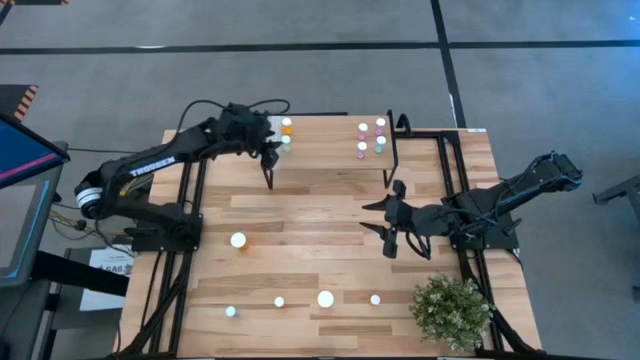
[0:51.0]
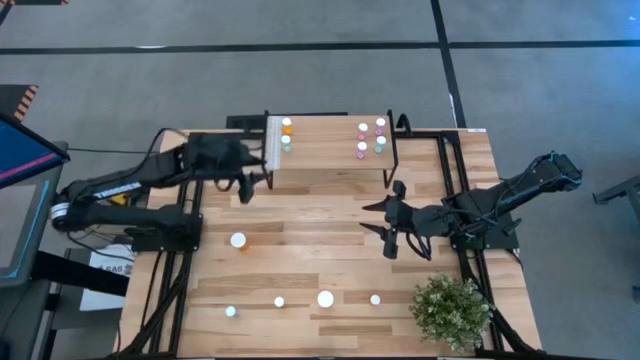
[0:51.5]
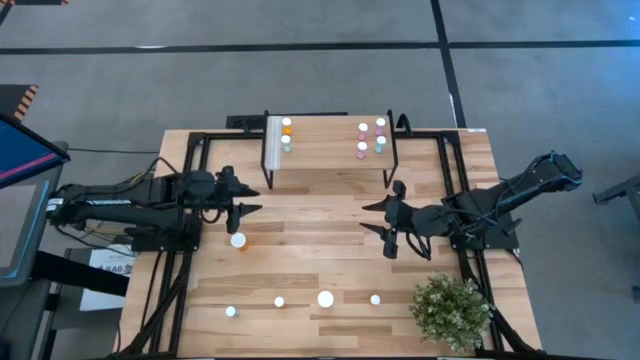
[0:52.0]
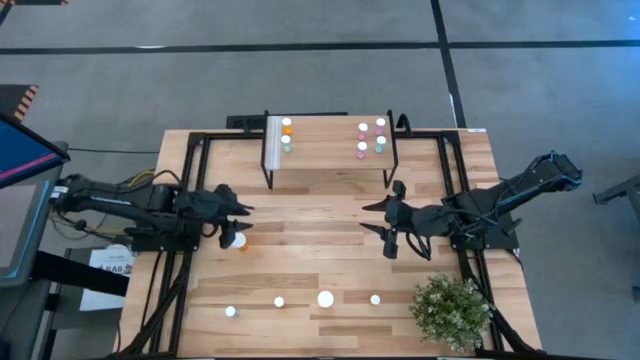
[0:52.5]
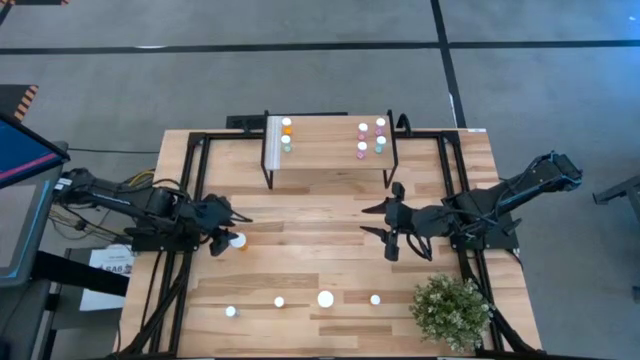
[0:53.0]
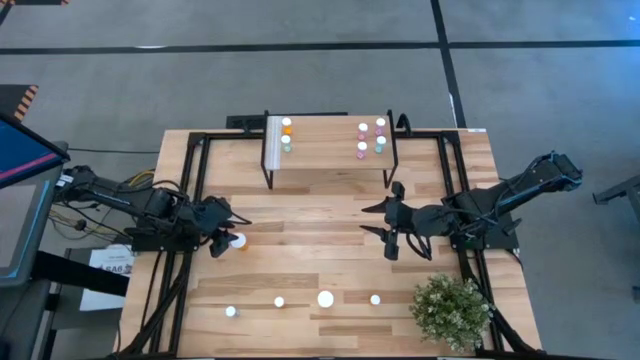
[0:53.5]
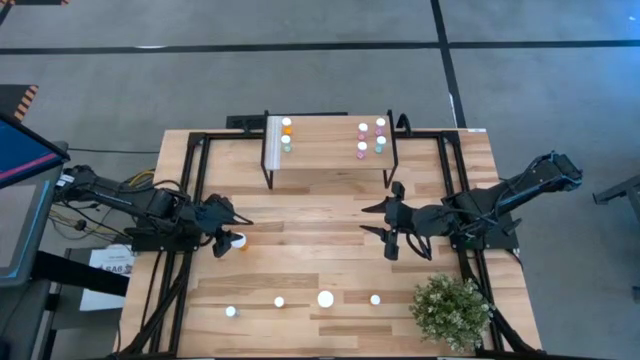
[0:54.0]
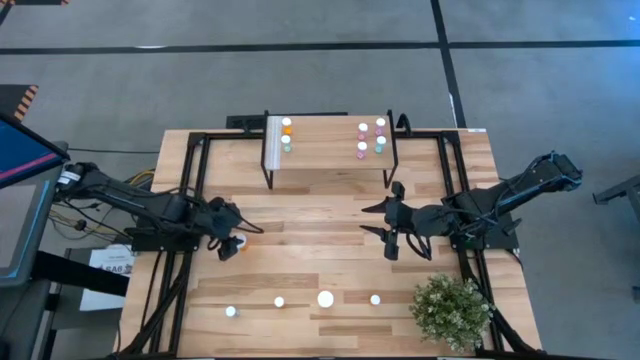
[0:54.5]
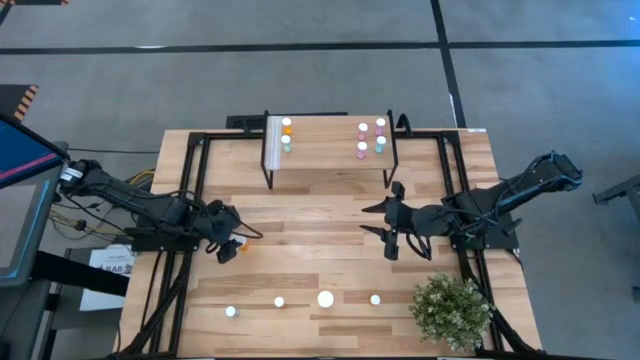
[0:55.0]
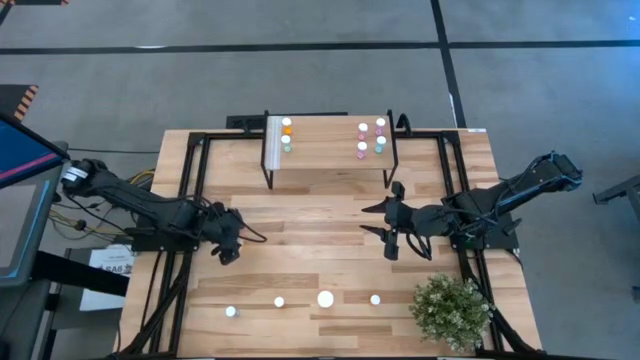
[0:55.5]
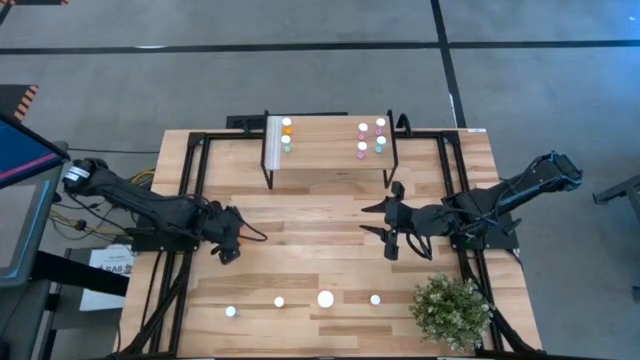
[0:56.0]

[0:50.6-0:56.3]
Task: Pick and place medicine bottles onto shelf by color
Put the top large orange pill bottle on the shelf

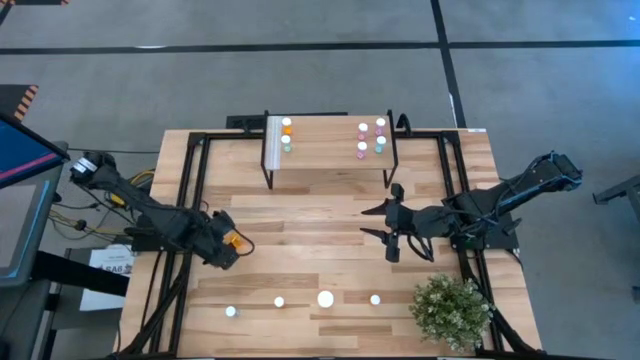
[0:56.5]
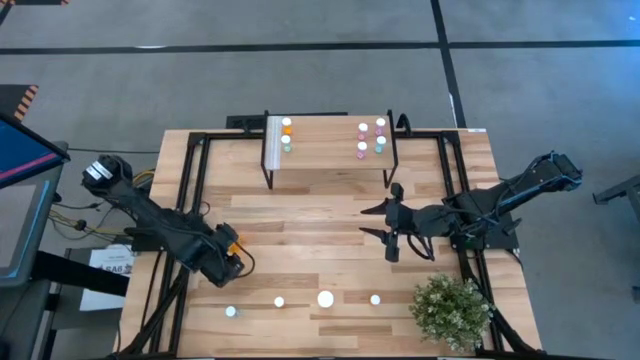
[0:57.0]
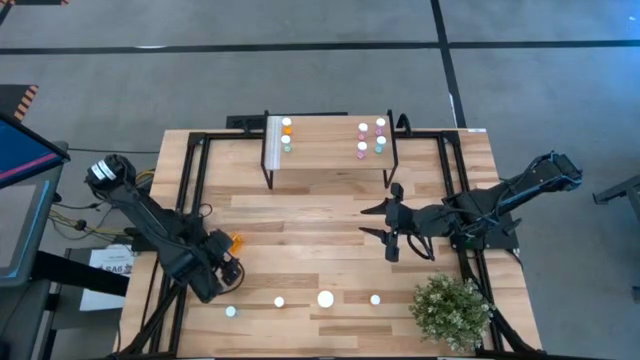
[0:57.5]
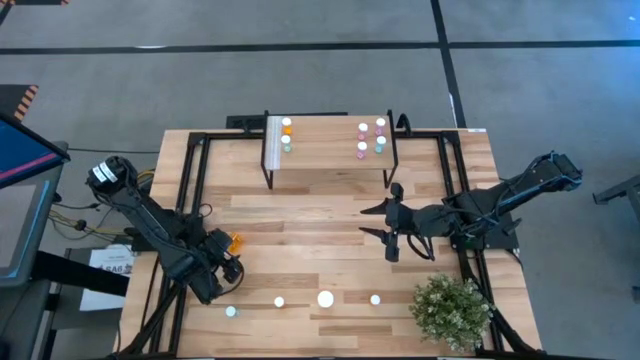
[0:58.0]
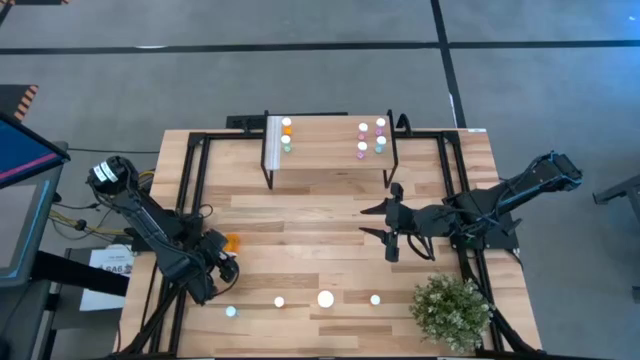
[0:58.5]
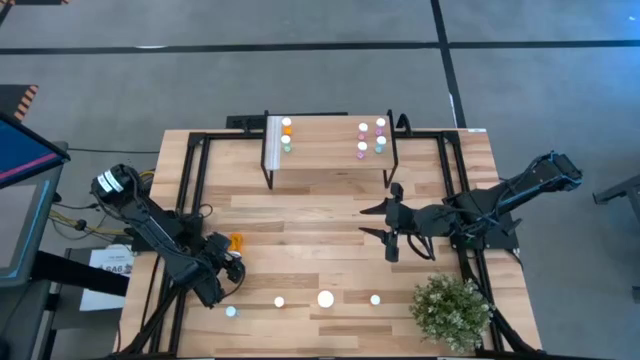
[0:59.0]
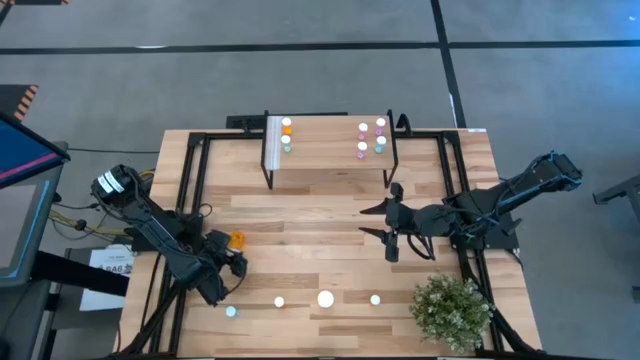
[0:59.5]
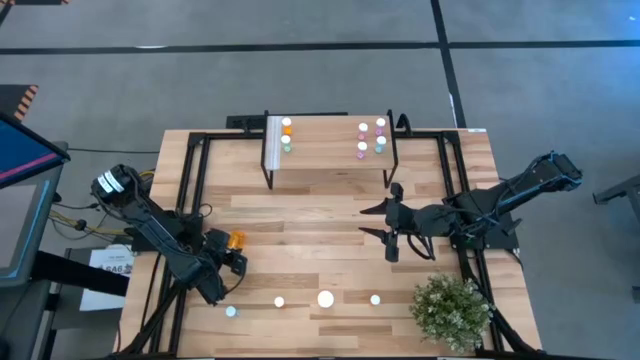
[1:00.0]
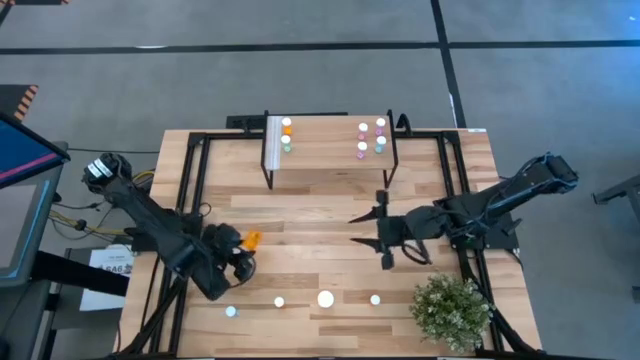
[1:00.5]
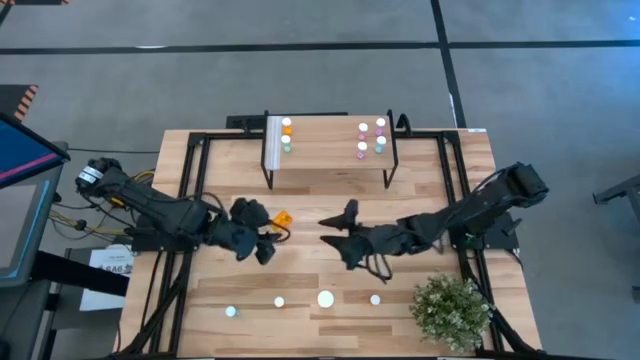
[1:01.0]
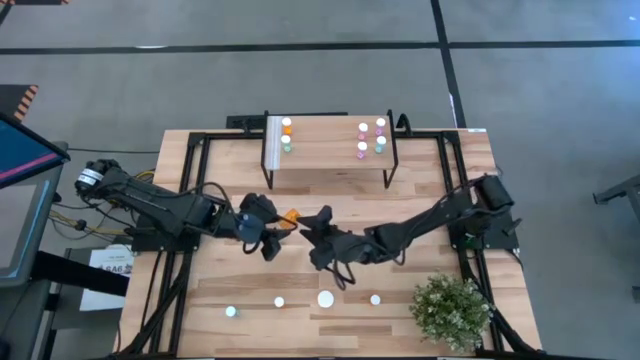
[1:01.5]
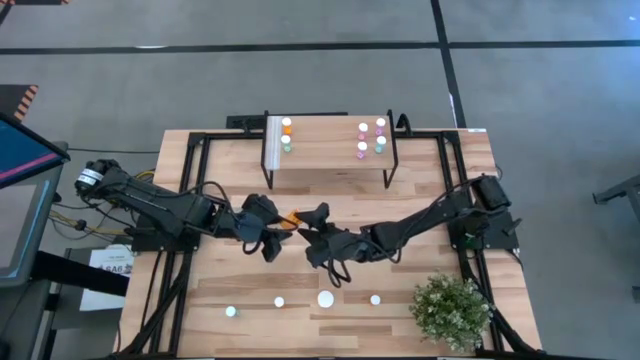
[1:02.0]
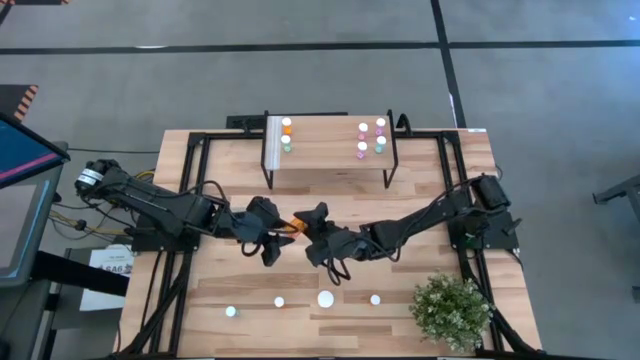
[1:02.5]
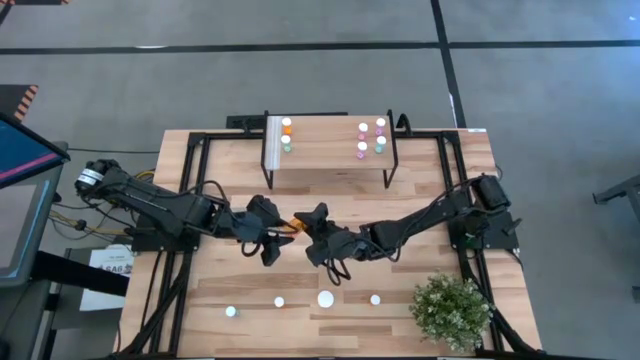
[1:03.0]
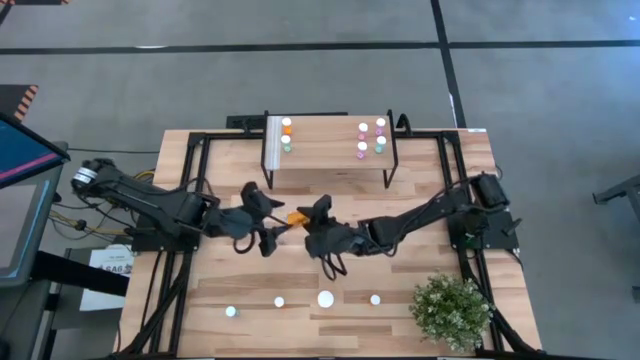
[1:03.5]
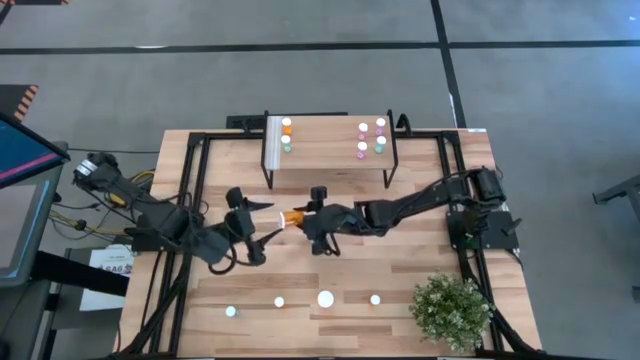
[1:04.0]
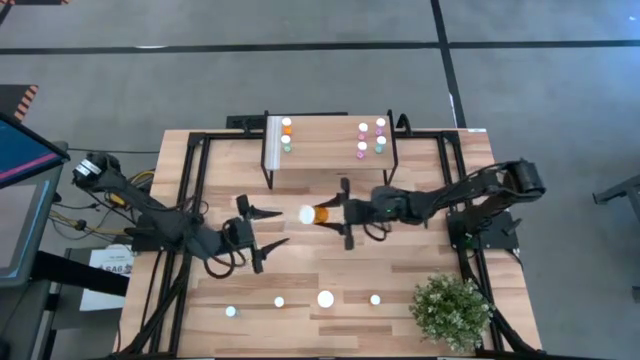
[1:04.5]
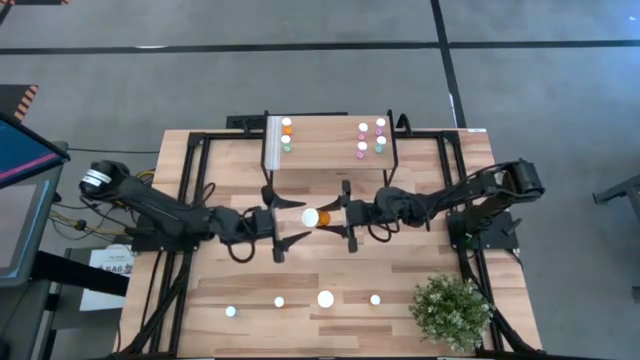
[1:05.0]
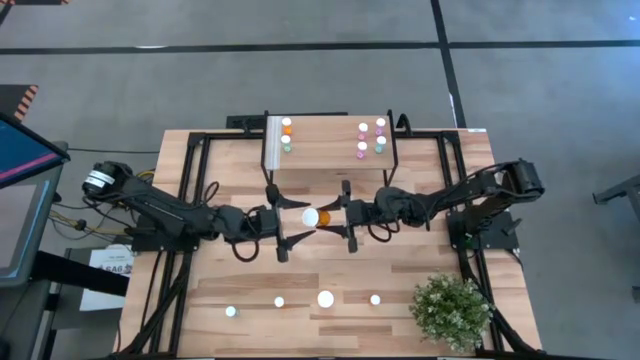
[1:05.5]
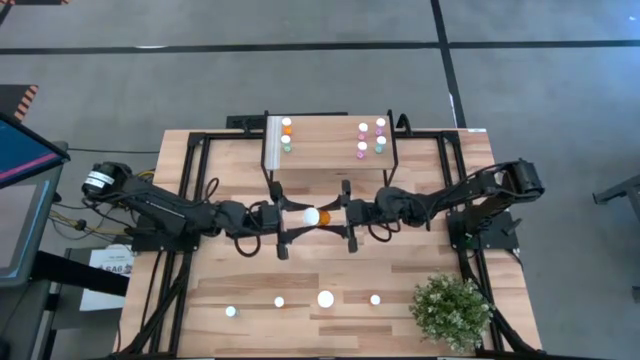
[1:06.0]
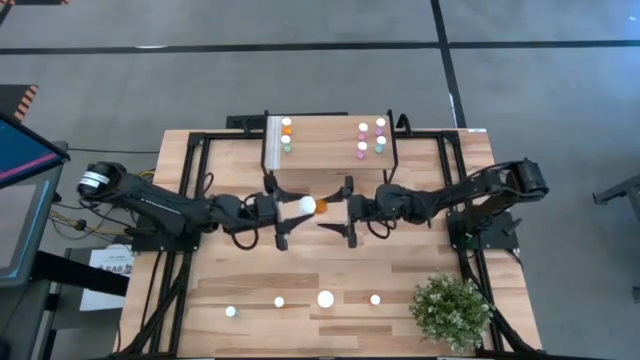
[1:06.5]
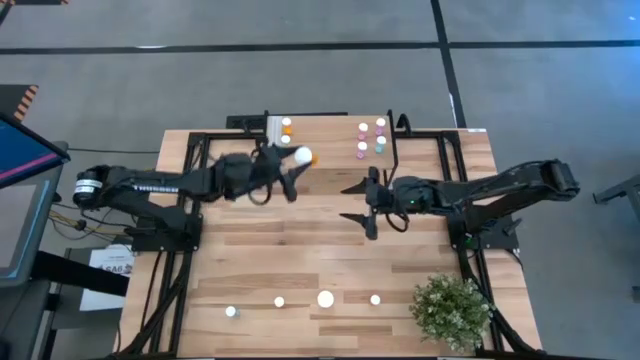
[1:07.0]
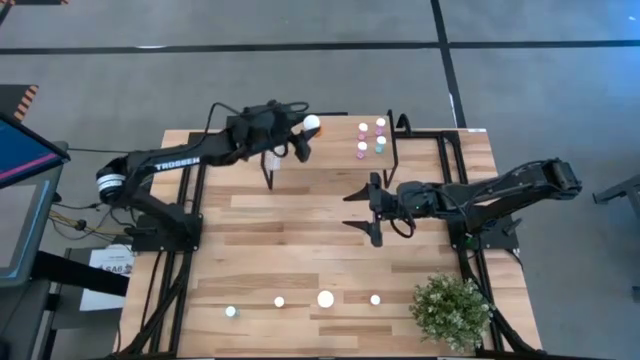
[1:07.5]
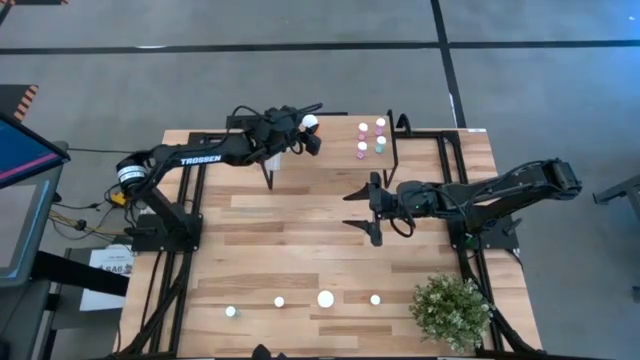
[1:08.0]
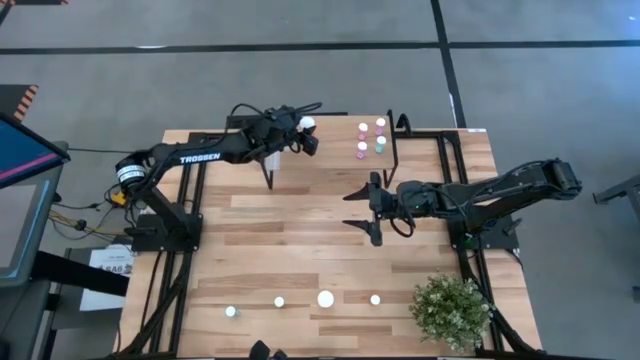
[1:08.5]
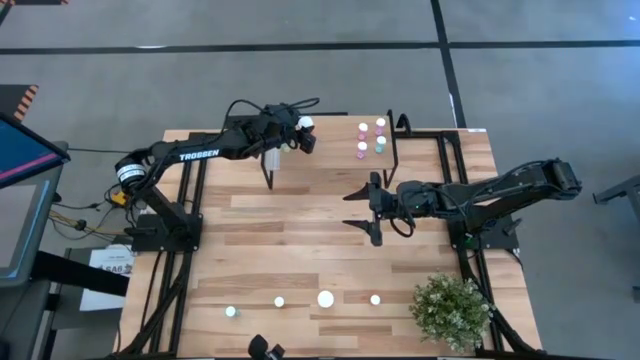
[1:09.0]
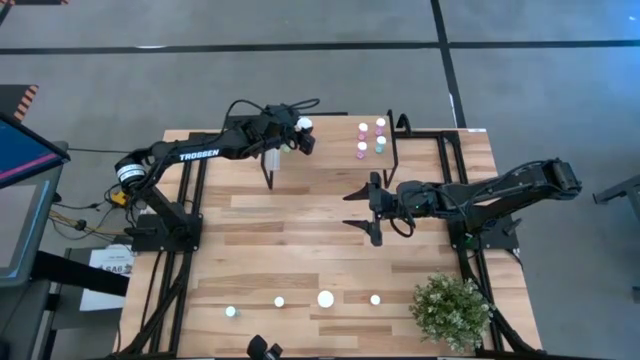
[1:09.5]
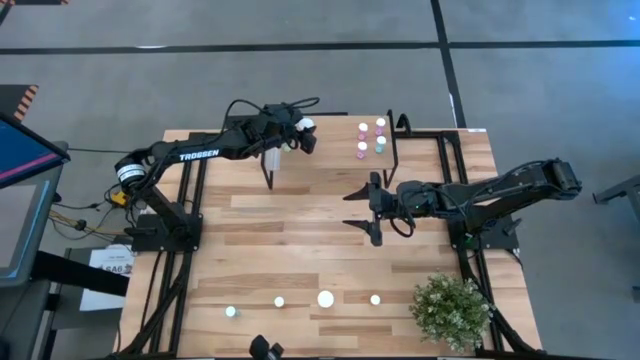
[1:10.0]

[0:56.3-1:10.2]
Put the top large orange pill bottle on the shelf

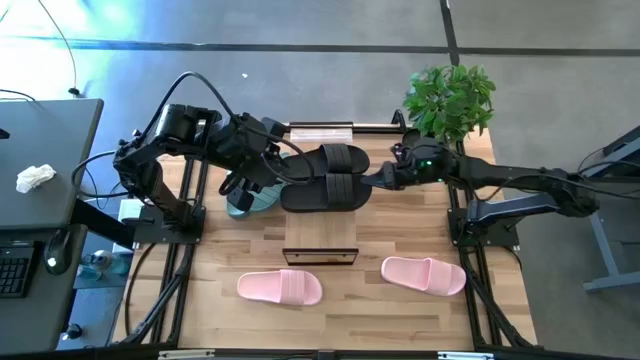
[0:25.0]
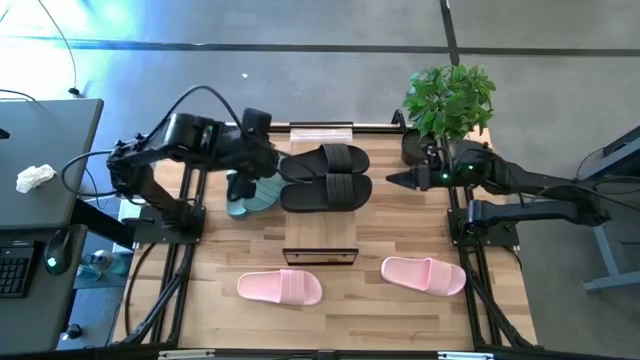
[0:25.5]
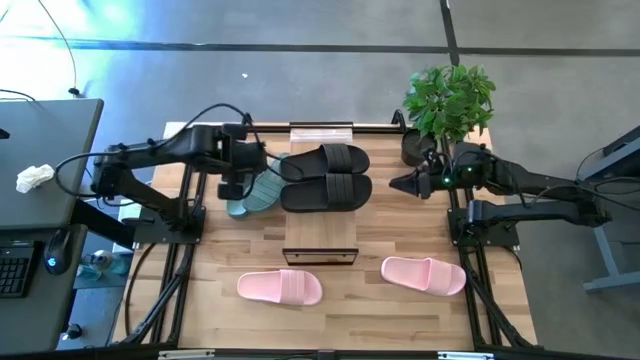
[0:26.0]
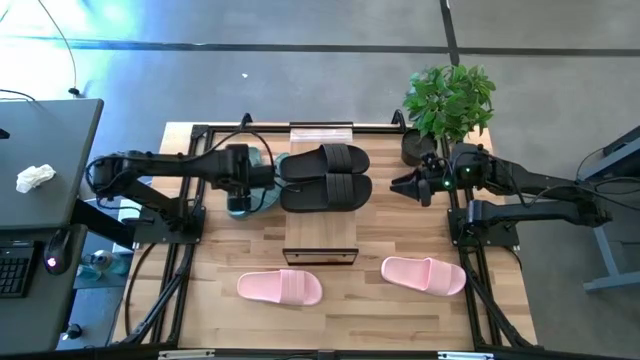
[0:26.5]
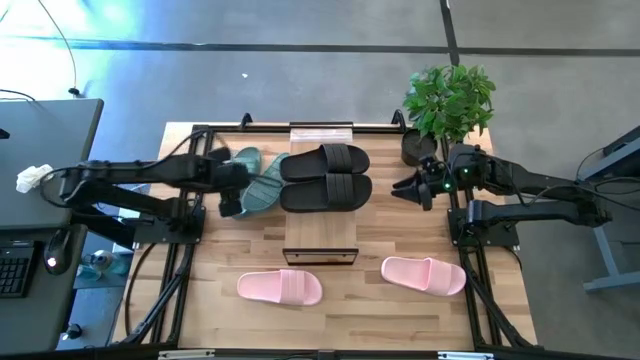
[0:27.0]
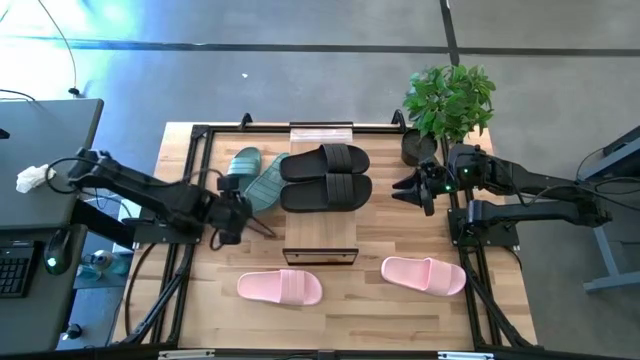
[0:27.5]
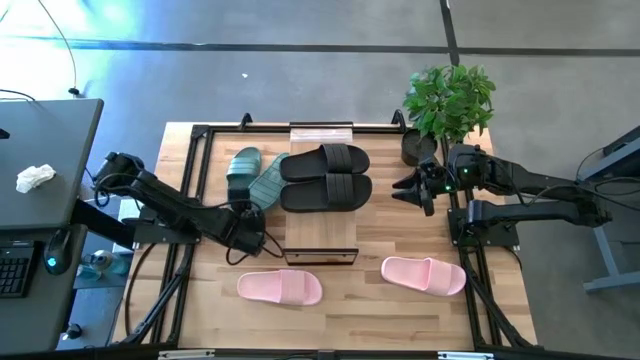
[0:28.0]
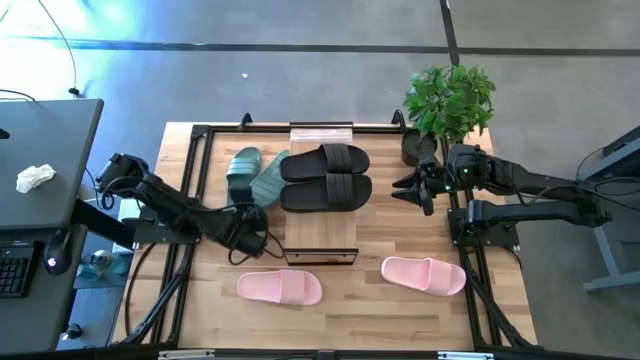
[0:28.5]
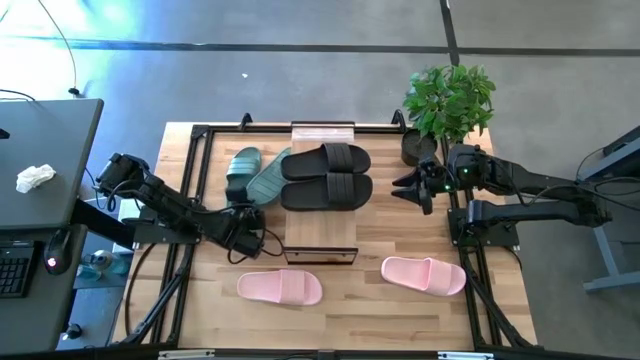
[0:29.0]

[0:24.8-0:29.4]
Task: Pick and place slides into the shelf
Adjust the green slide
